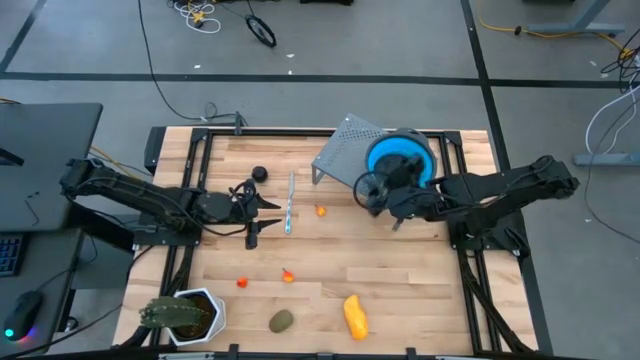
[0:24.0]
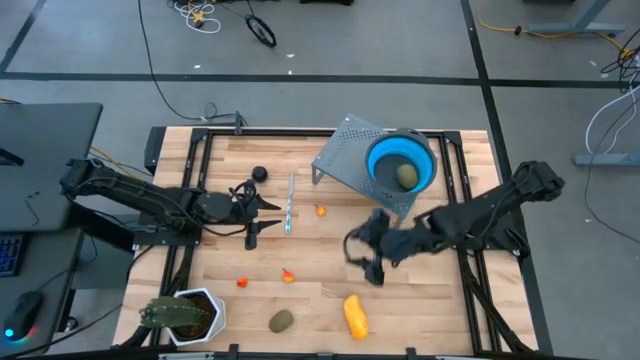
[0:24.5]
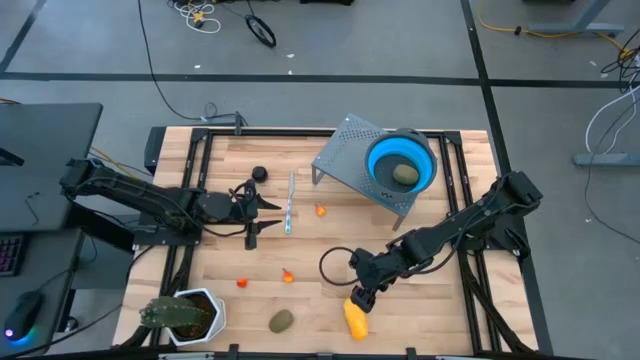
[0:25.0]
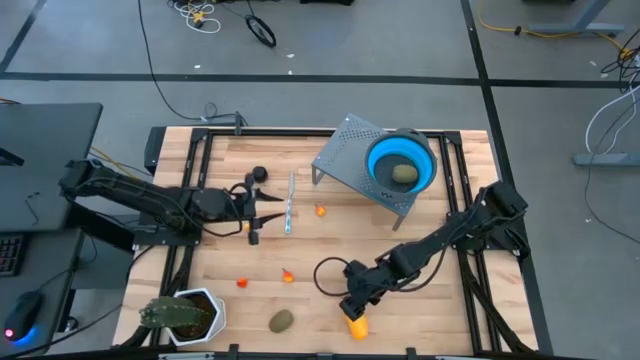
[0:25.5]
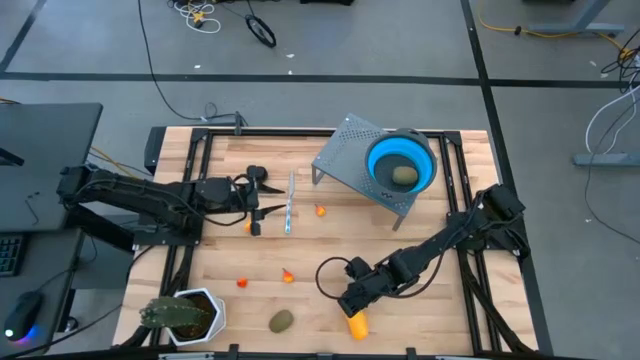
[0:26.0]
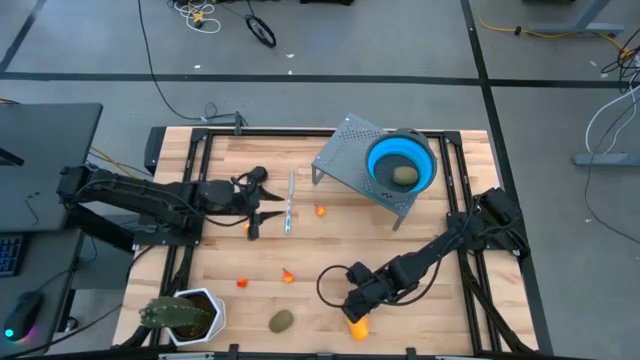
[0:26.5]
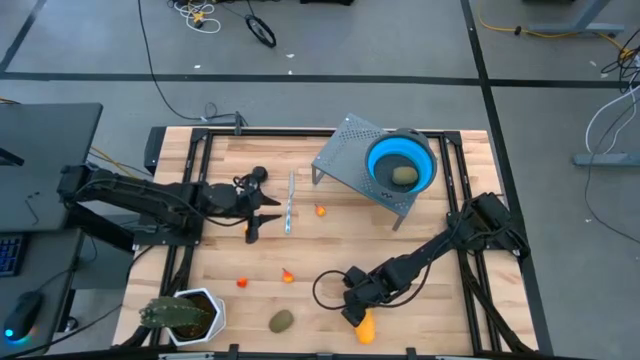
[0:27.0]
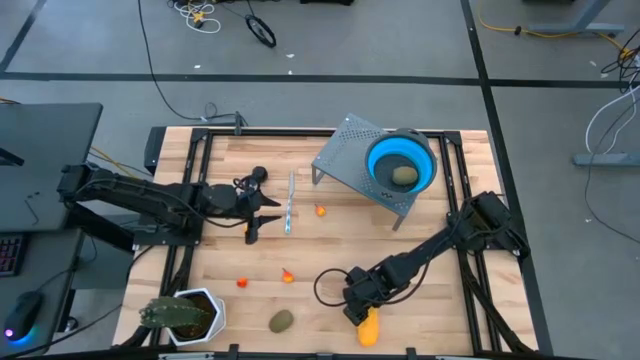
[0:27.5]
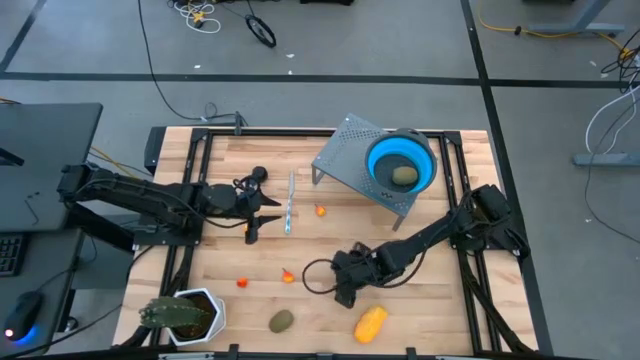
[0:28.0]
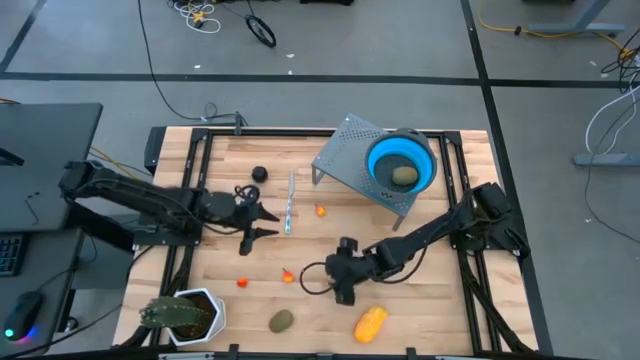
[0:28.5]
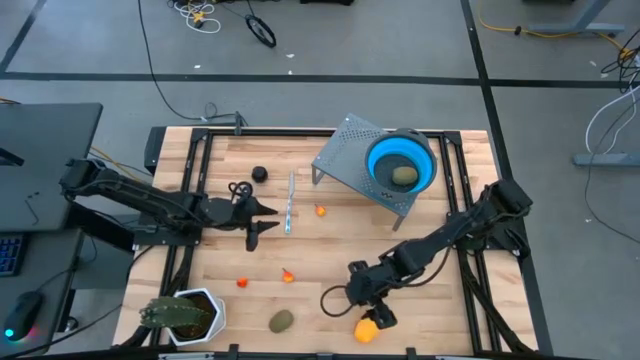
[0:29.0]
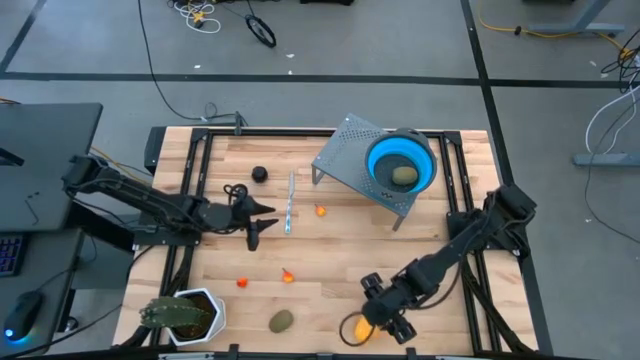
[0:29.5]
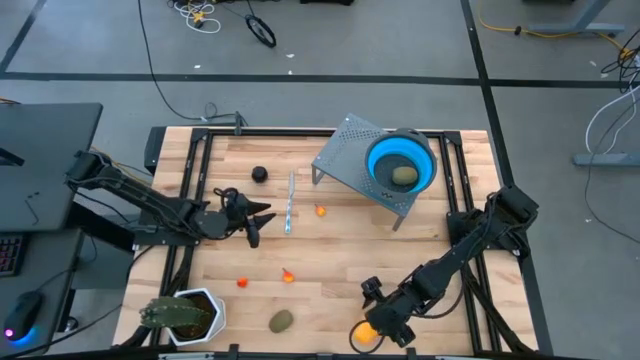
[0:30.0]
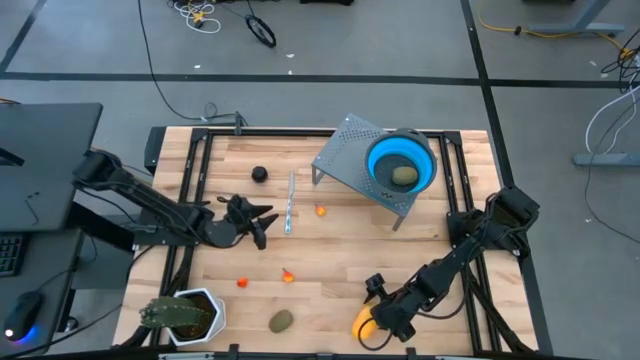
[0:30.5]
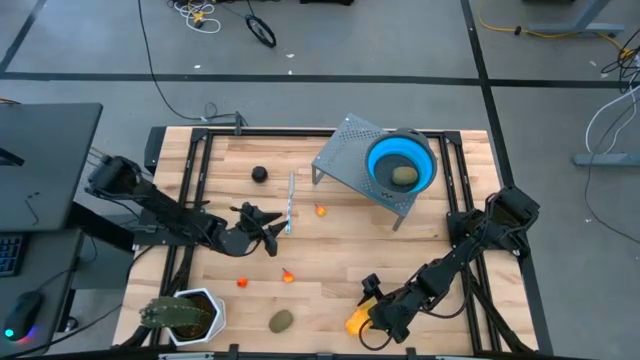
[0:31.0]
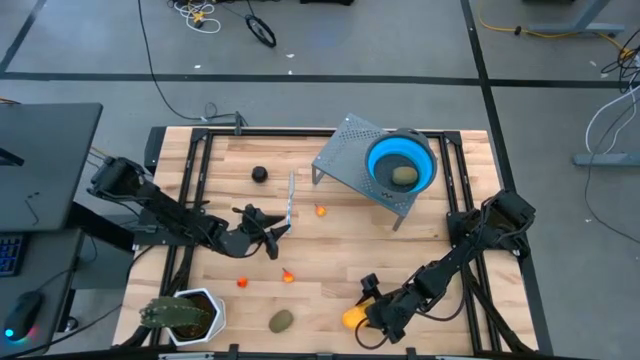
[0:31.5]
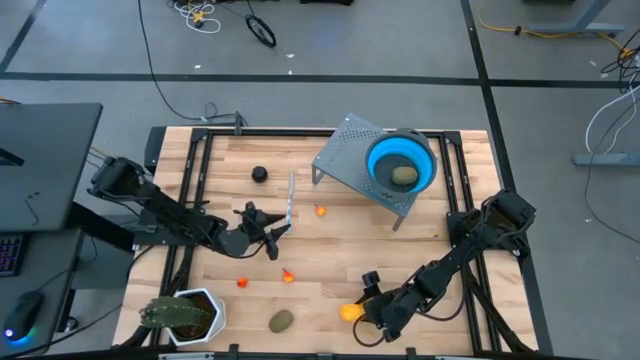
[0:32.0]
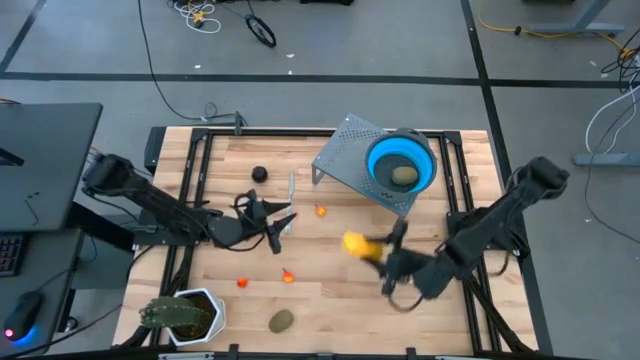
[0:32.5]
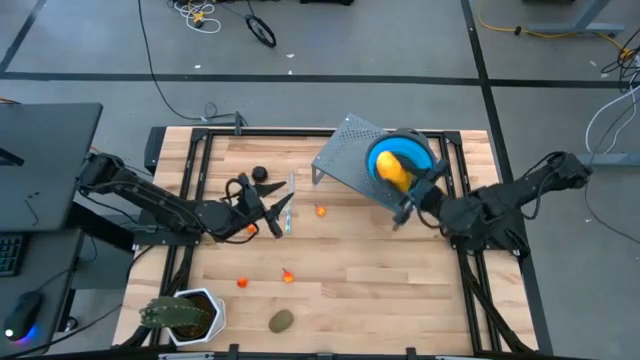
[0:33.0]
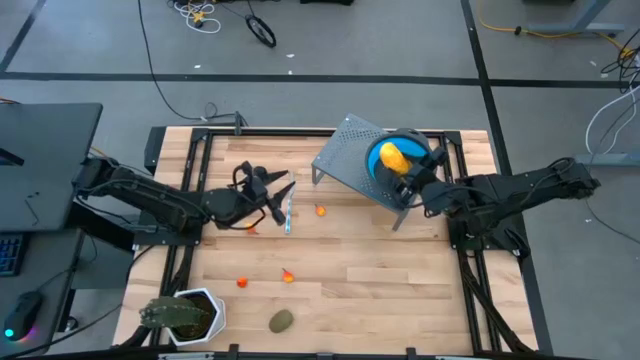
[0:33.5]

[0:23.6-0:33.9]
Task: Pick & Place Fruit
Put the yellow mango in the blue strainer bowl on the shelf

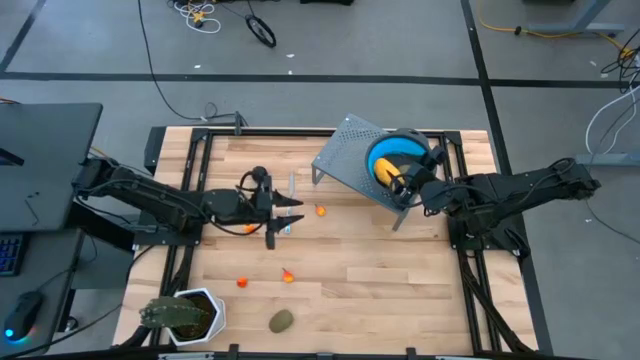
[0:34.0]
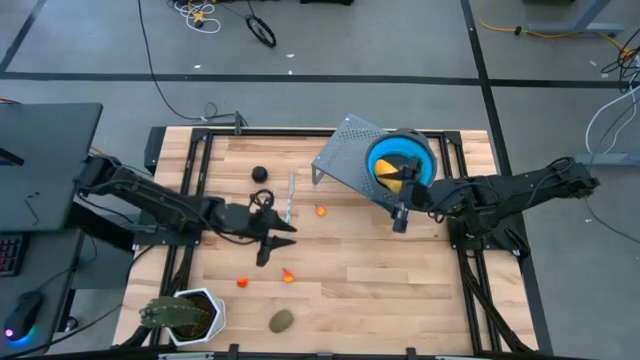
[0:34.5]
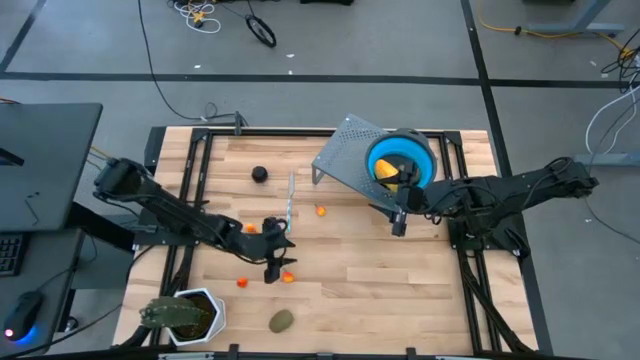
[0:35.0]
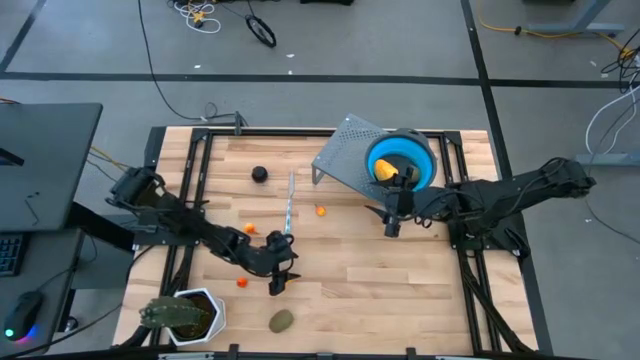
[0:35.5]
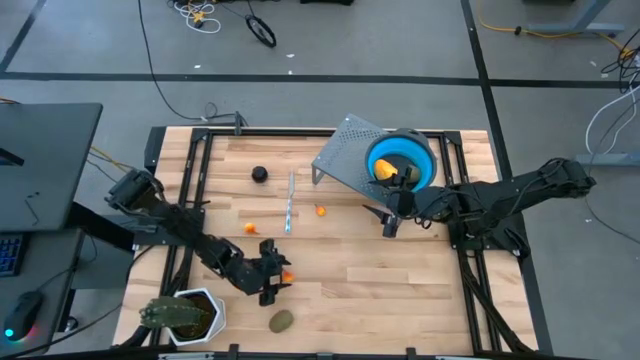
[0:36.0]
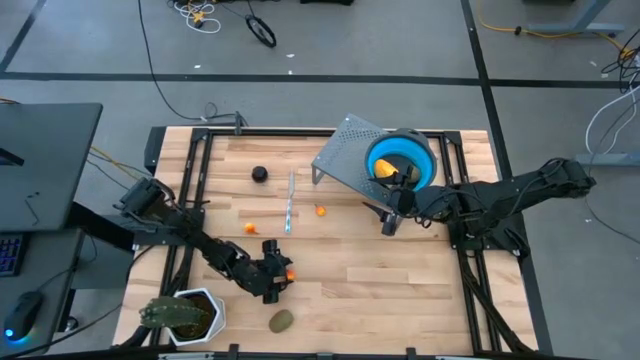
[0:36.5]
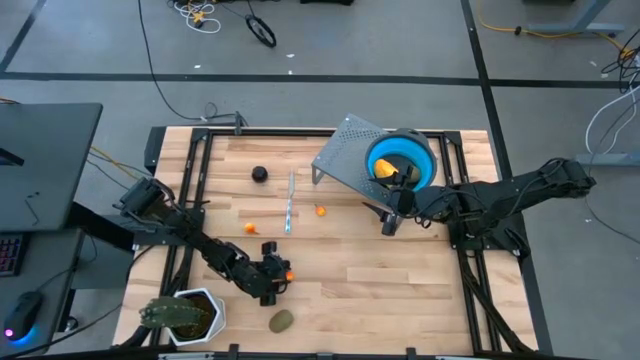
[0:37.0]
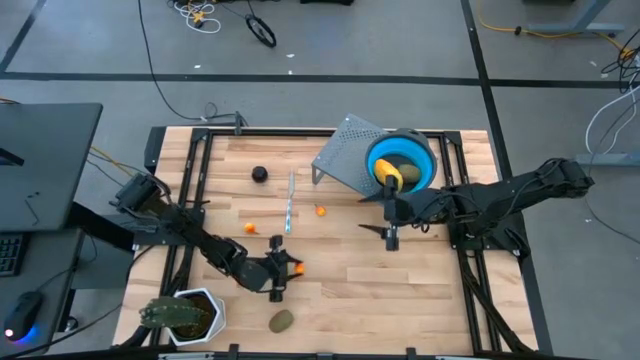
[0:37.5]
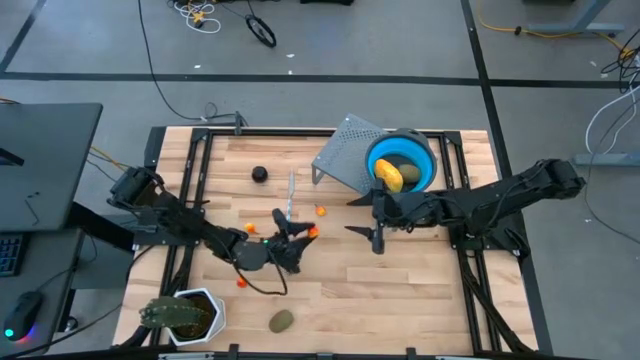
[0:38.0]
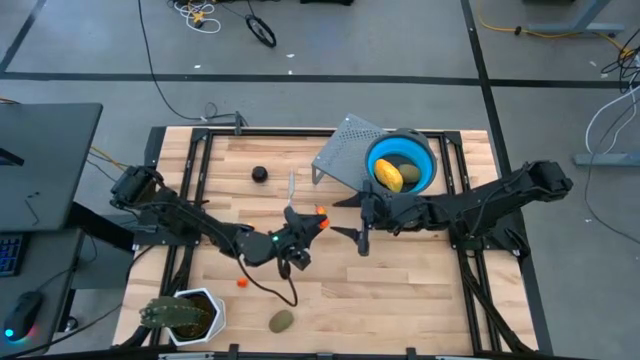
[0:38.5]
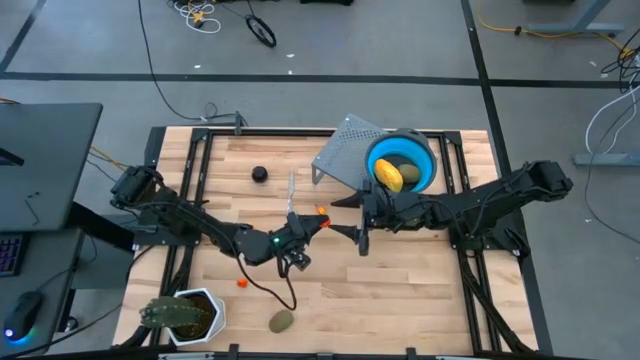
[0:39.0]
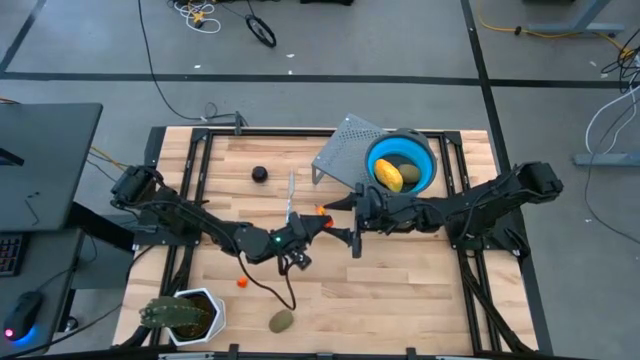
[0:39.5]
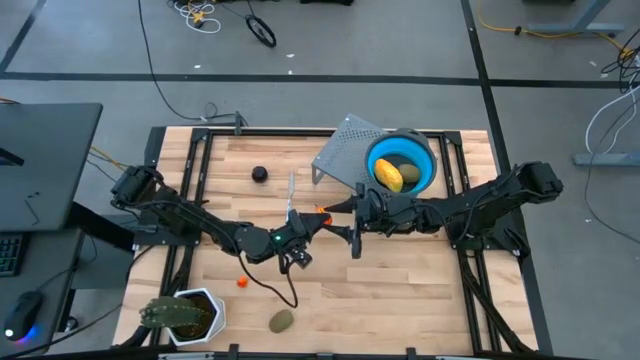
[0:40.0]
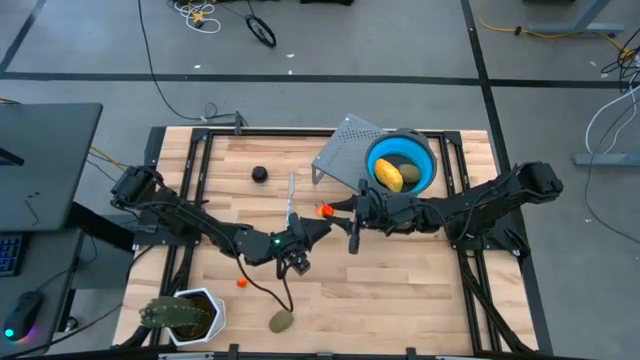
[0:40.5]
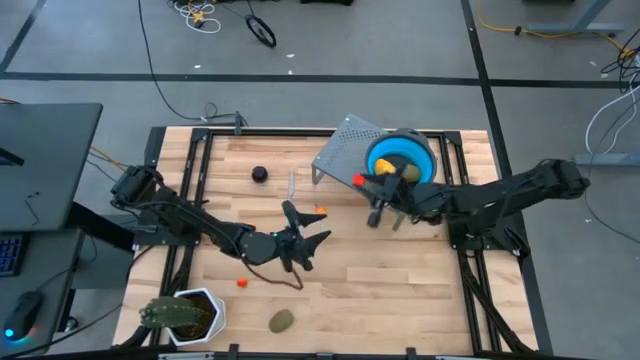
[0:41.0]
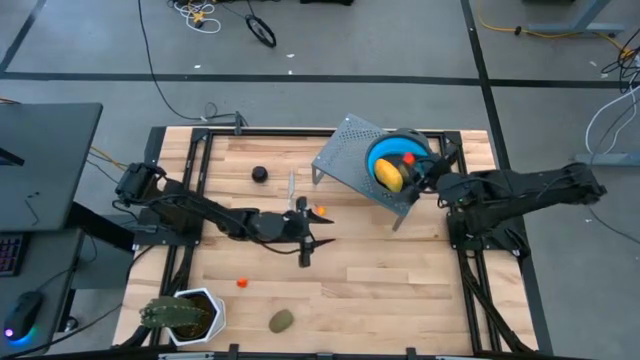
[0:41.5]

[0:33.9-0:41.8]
Put the yellow peach in the blue strainer bowl on the shelf

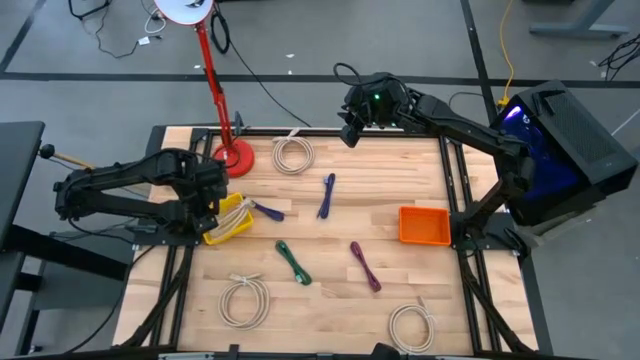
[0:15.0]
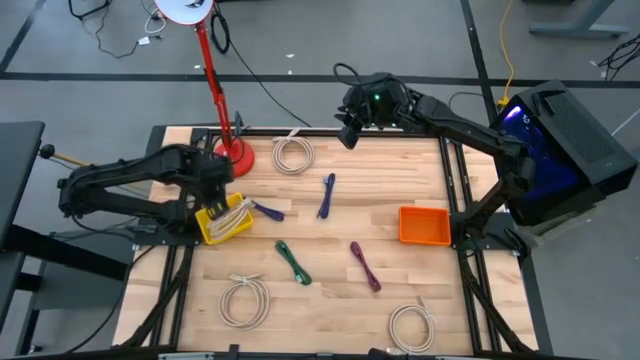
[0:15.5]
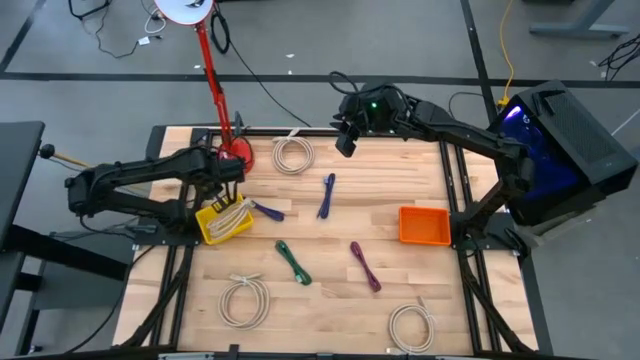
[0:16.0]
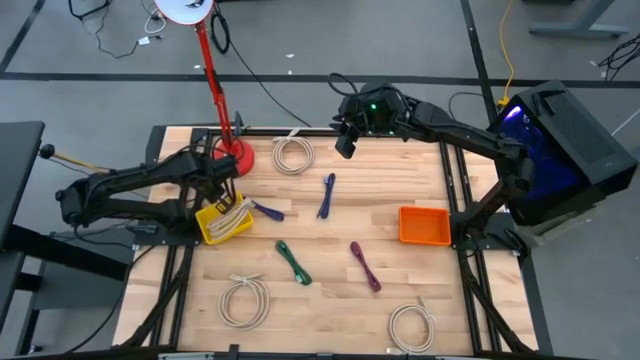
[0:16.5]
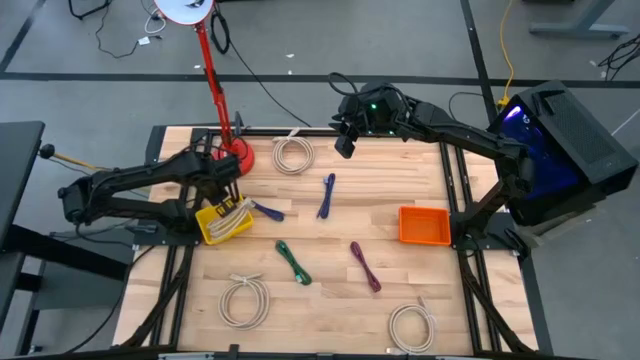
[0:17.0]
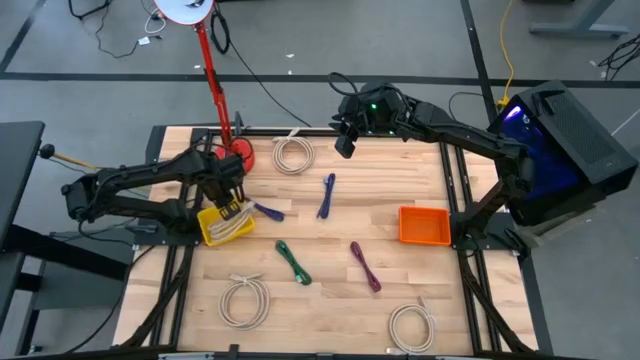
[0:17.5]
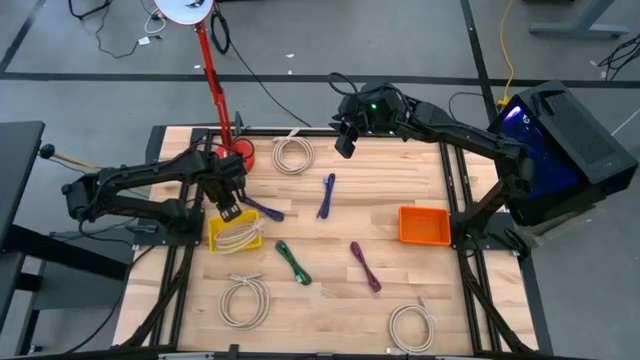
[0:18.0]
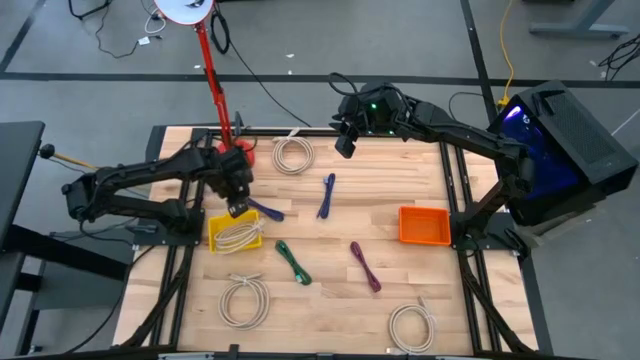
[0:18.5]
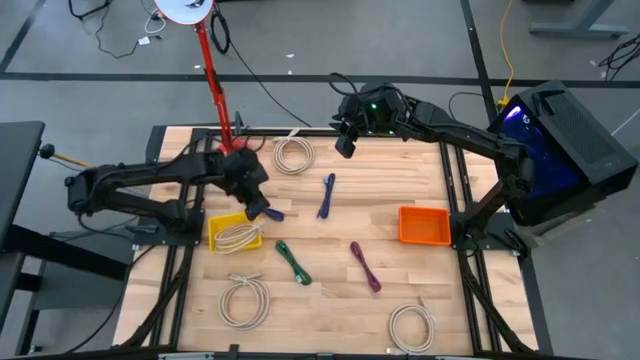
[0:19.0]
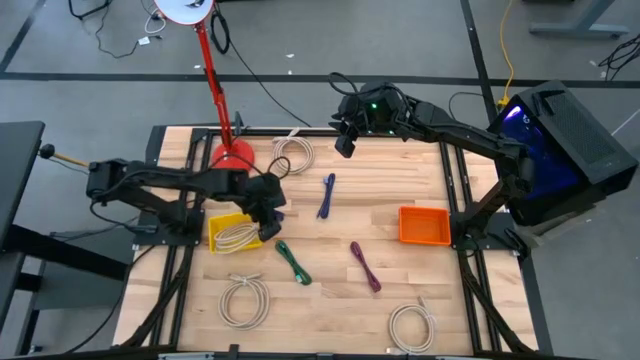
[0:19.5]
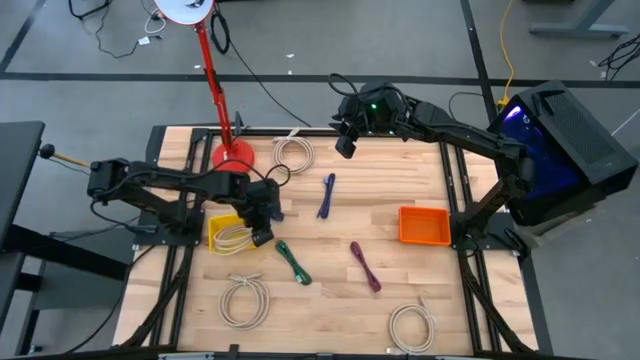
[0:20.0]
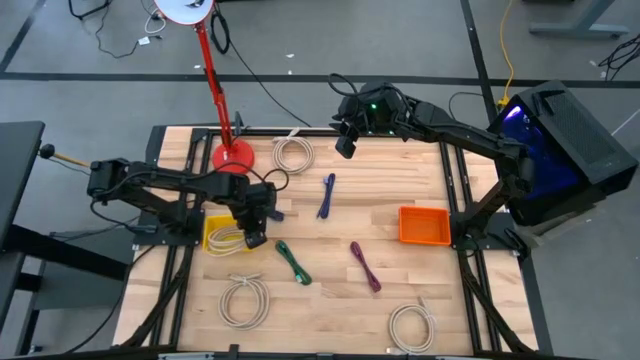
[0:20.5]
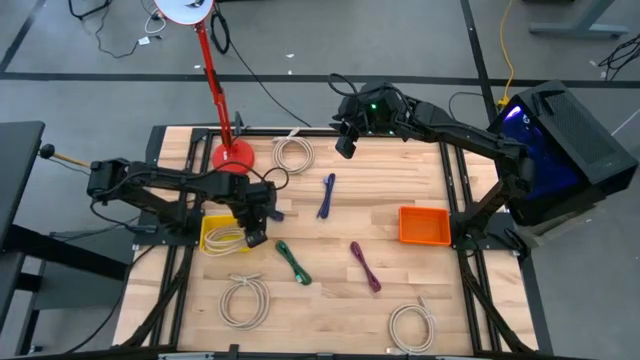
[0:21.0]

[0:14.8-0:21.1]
Task: Pick & Place USB Port
Adjust the yellow bin
